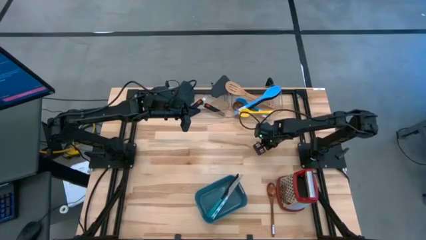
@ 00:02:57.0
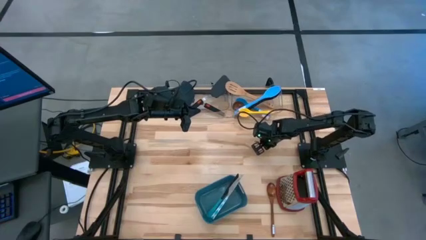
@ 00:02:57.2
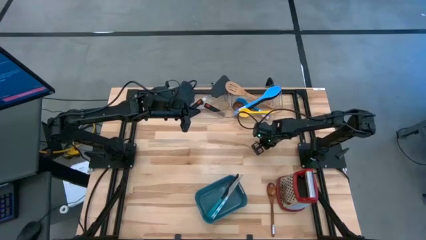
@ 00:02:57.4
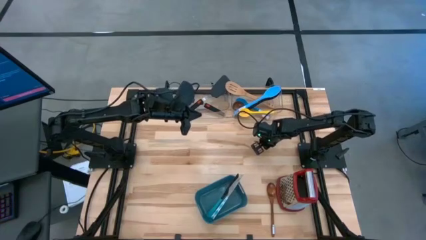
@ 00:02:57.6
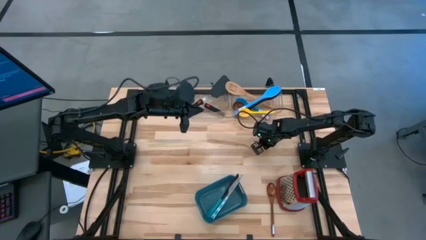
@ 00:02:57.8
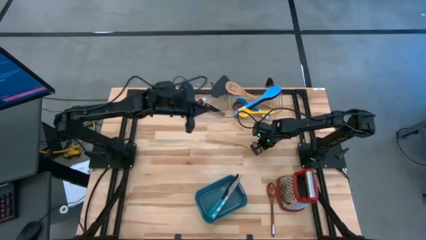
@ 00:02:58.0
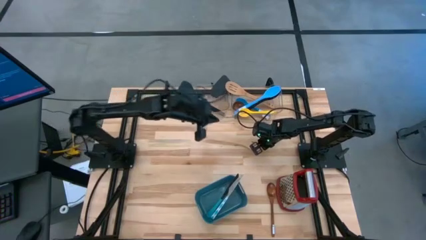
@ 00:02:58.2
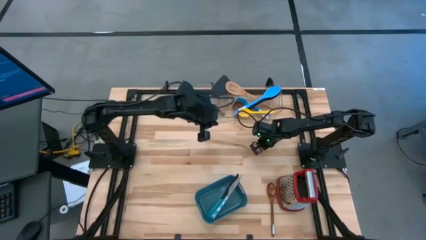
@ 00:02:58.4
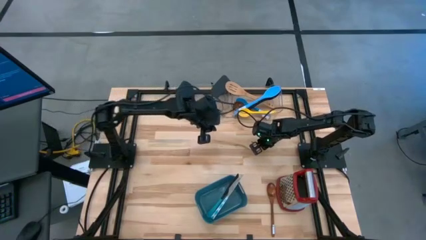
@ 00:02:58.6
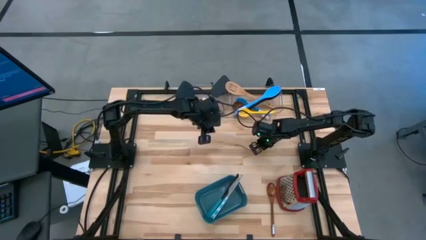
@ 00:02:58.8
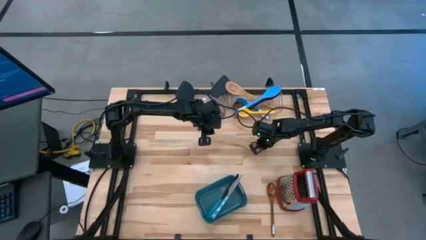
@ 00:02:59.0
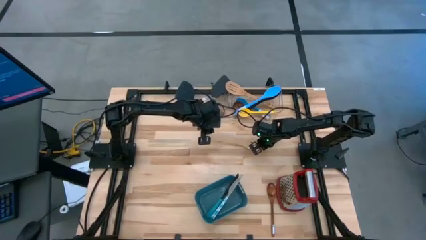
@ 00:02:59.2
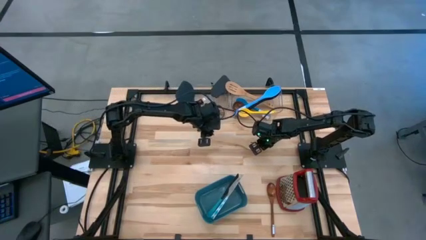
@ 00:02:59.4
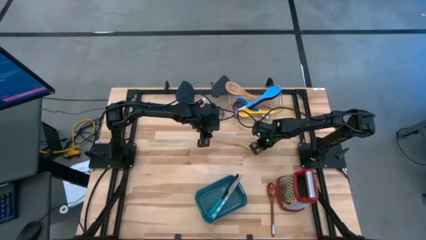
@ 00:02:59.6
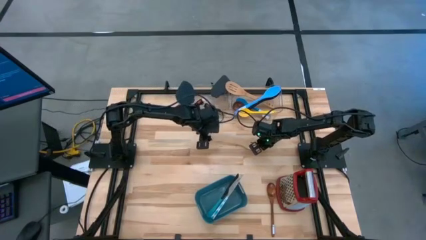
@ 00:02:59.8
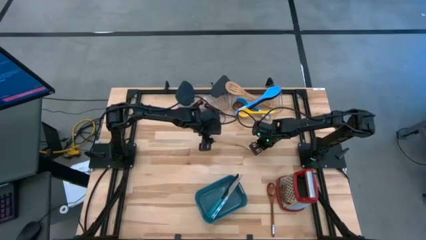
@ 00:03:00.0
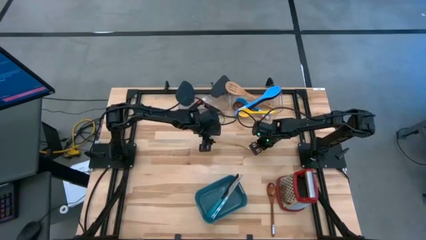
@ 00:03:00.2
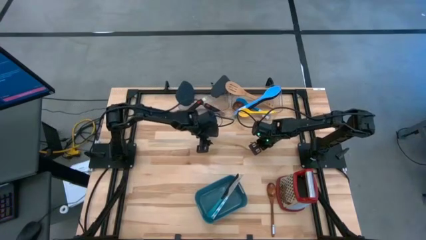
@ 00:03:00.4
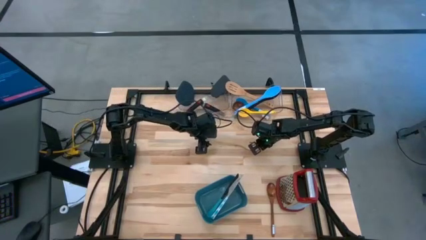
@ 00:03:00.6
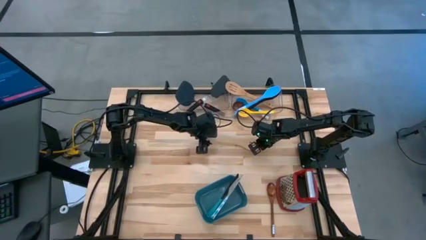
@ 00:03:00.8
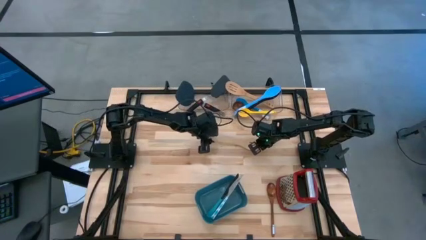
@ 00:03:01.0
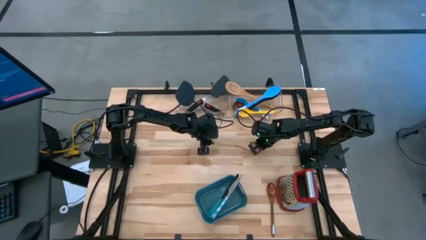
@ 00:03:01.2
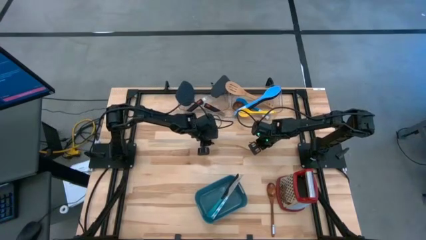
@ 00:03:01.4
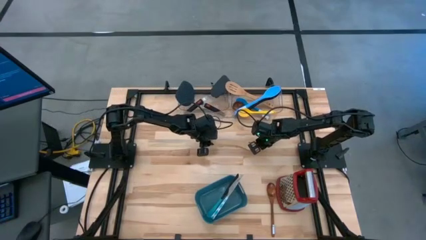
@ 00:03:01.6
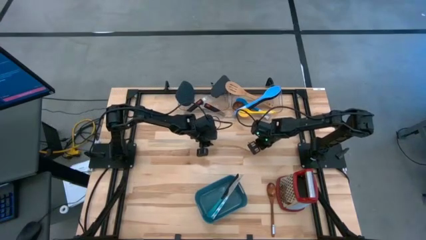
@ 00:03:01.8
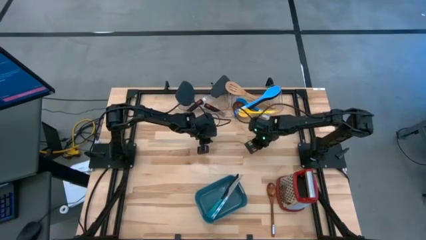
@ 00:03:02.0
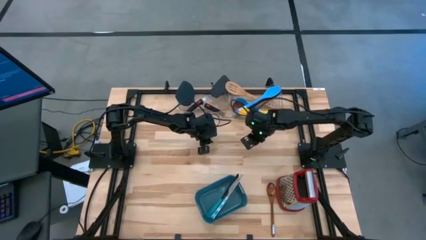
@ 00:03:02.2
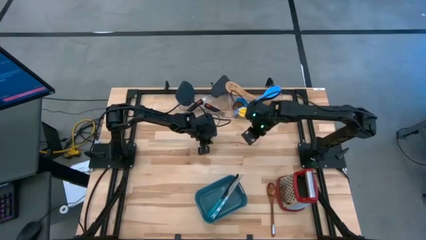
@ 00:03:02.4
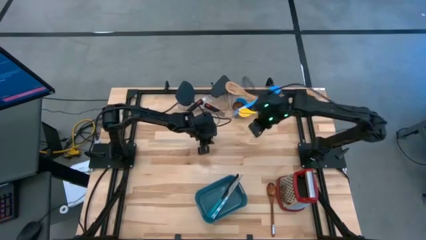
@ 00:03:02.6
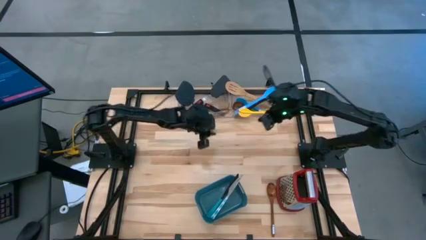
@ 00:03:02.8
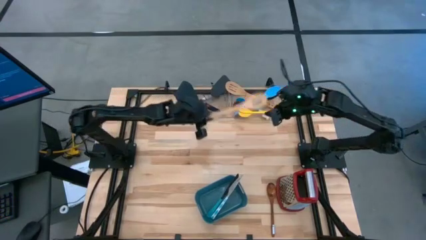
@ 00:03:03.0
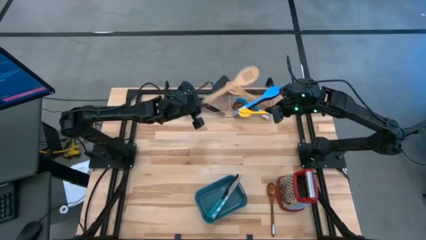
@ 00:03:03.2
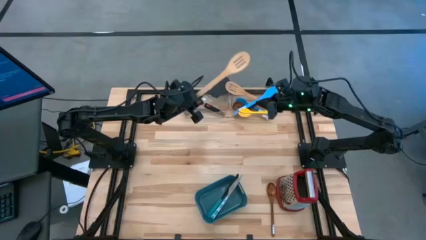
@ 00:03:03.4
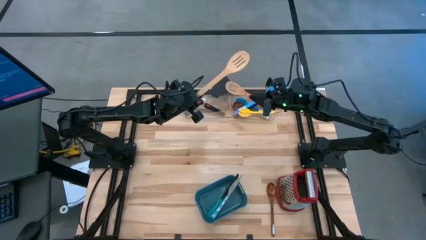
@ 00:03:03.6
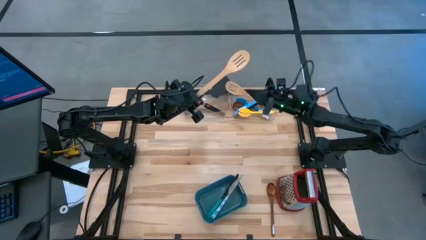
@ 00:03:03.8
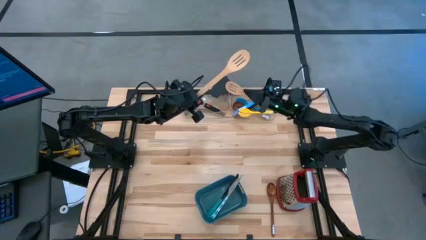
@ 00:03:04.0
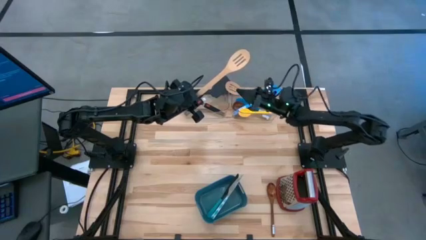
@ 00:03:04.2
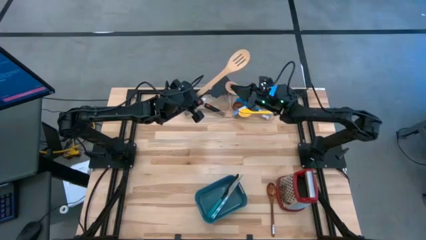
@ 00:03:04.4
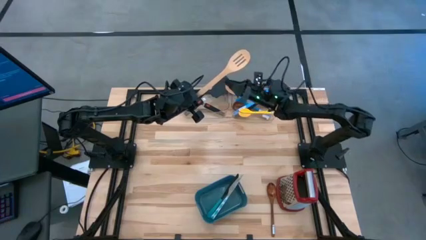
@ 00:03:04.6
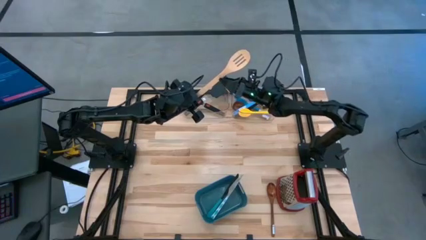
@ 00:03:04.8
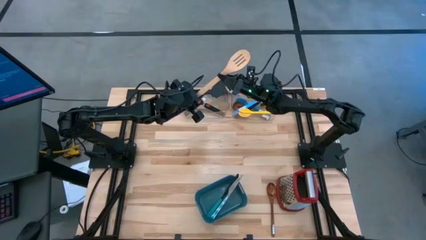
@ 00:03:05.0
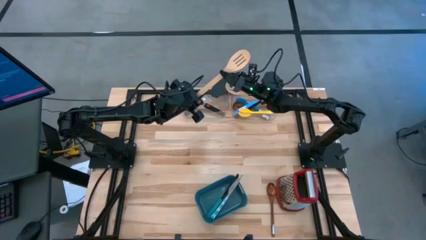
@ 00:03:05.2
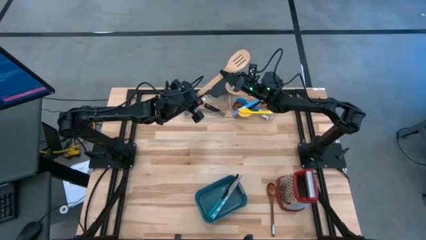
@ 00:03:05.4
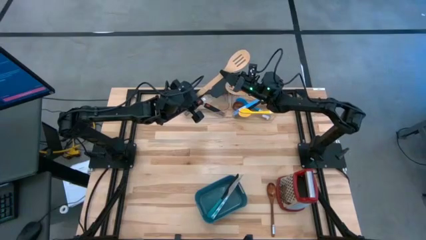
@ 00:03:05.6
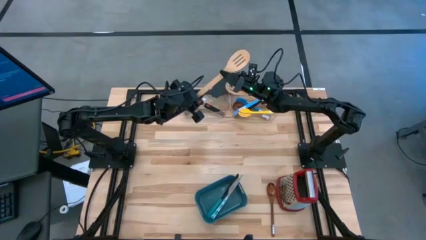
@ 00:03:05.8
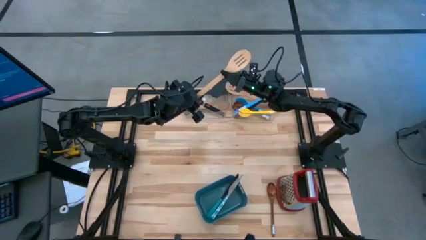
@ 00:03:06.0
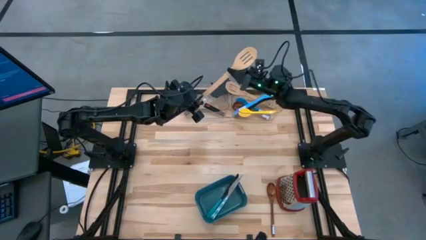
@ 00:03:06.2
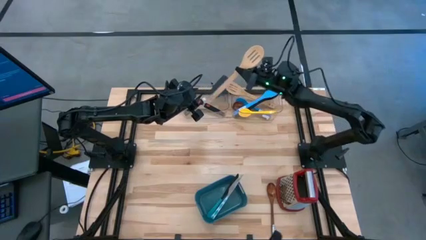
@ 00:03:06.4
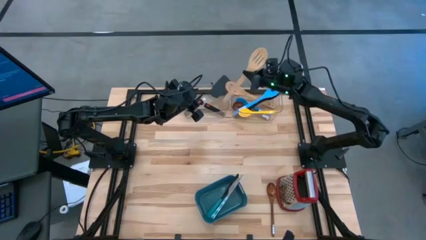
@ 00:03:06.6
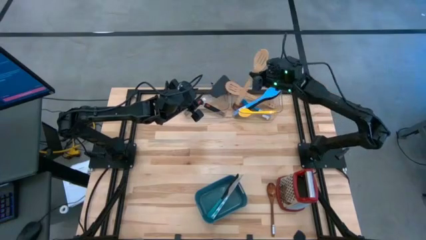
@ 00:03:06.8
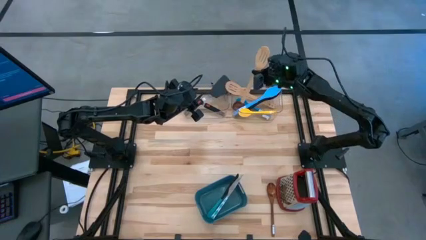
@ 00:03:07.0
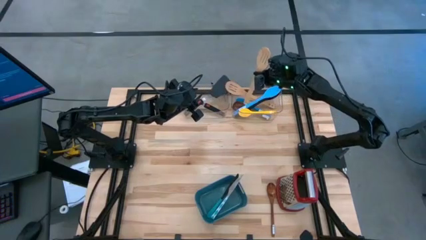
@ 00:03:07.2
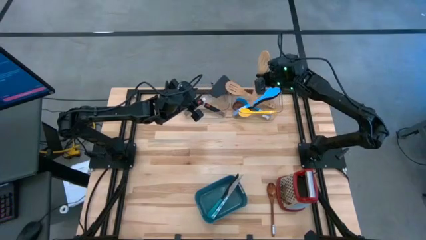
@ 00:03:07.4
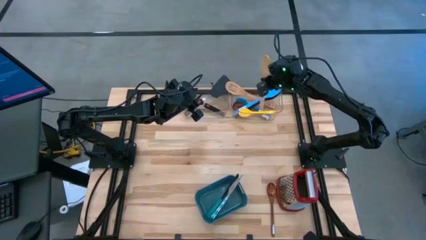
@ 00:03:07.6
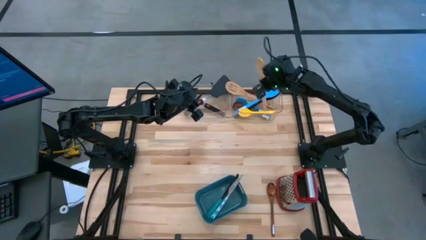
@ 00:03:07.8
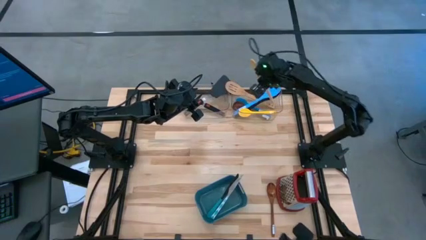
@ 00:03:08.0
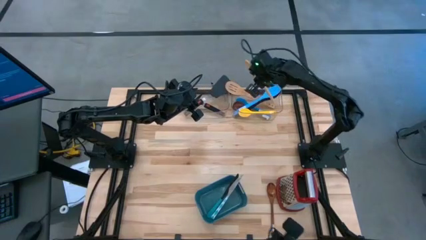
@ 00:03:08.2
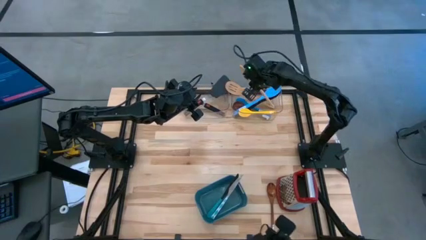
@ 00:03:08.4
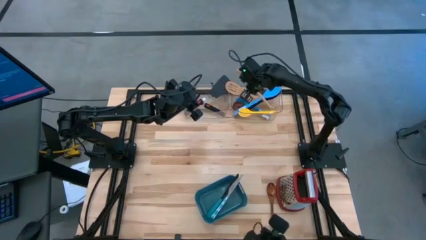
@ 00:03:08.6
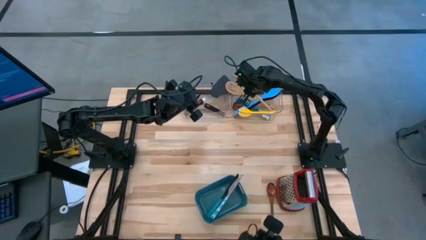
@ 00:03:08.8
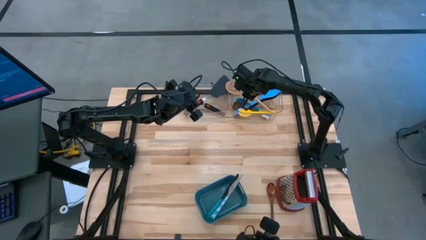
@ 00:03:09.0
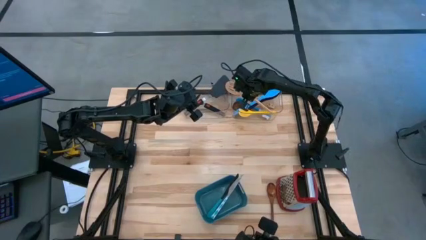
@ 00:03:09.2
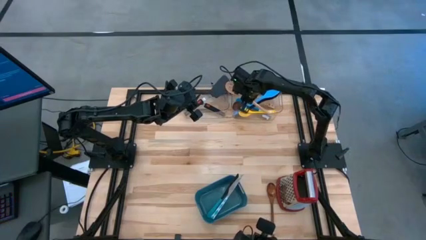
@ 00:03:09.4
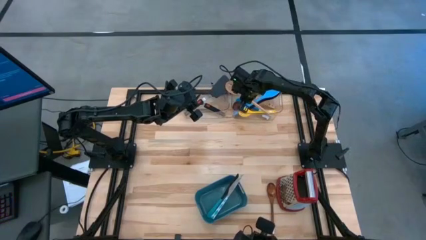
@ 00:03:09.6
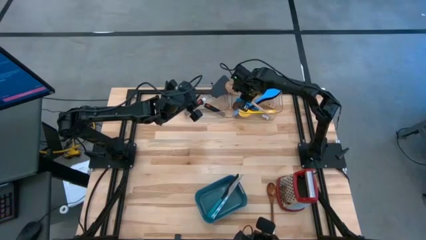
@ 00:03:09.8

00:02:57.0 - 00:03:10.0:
Task: Pick & Place Kitchen Items
Put the wooden slotted spatula into the top right transparent bin
